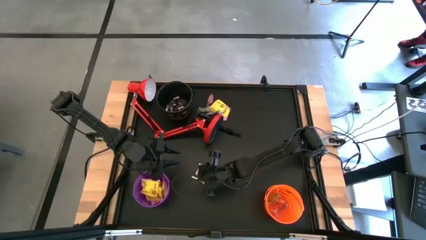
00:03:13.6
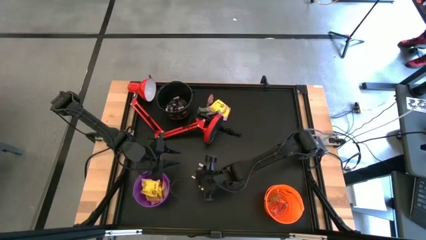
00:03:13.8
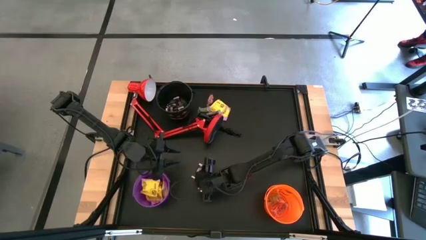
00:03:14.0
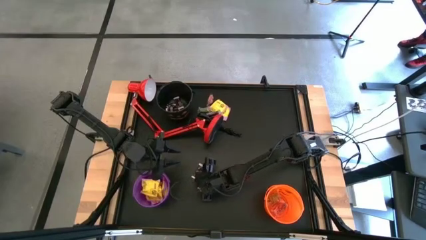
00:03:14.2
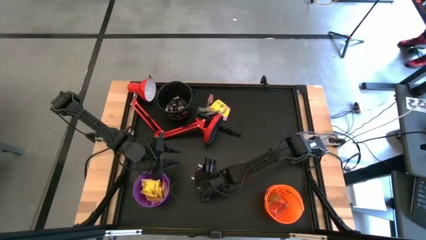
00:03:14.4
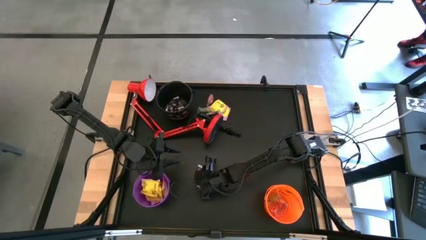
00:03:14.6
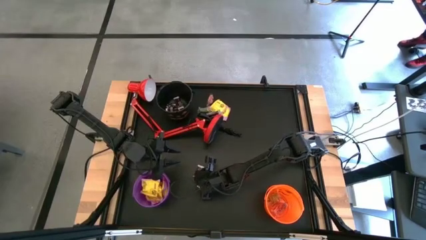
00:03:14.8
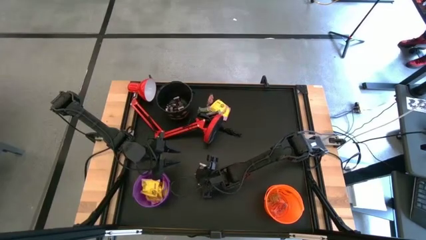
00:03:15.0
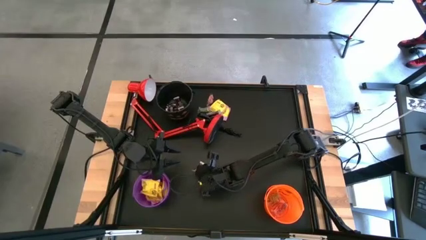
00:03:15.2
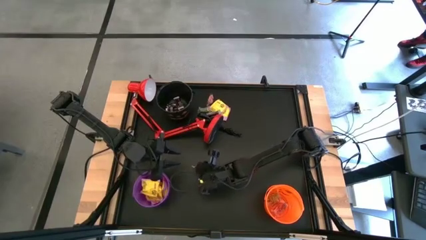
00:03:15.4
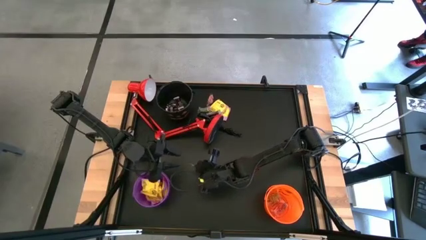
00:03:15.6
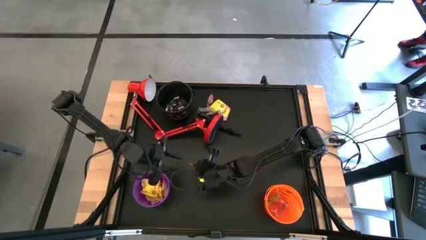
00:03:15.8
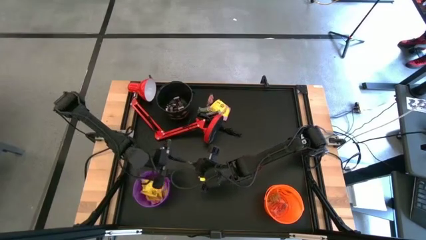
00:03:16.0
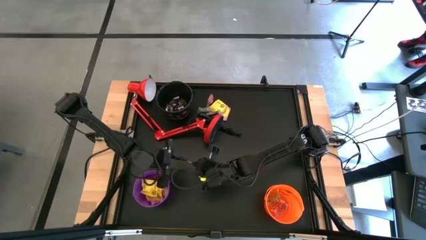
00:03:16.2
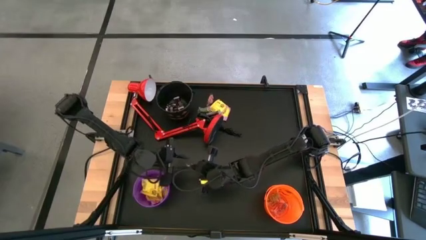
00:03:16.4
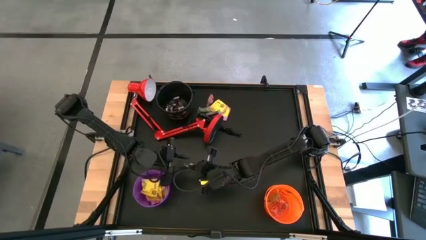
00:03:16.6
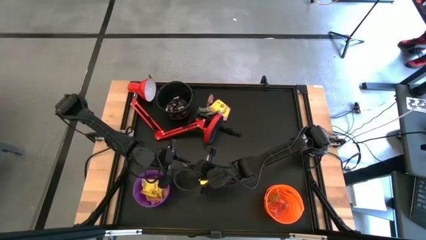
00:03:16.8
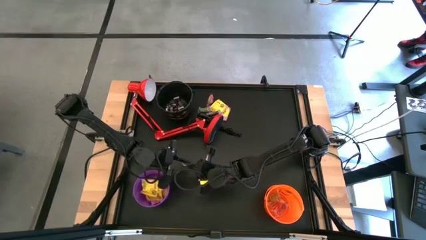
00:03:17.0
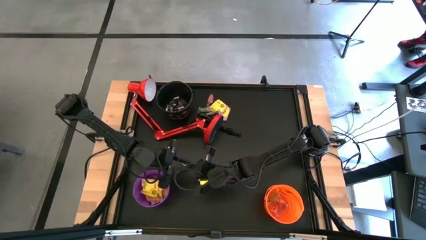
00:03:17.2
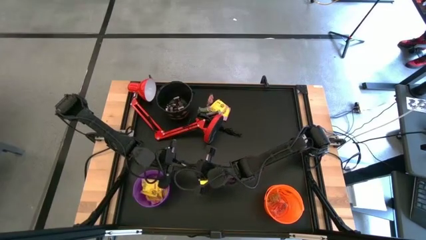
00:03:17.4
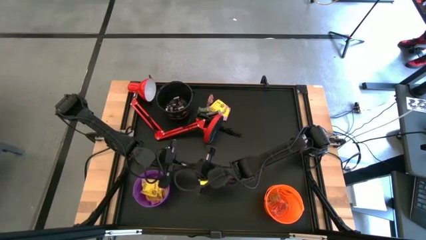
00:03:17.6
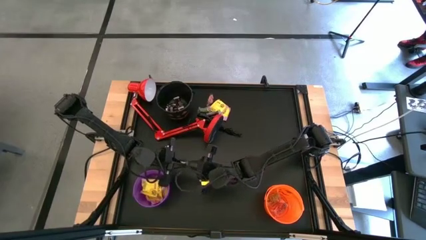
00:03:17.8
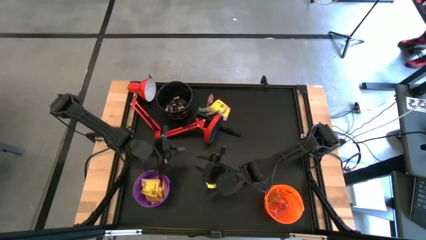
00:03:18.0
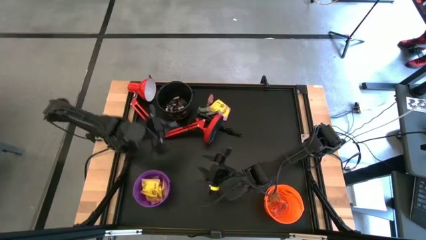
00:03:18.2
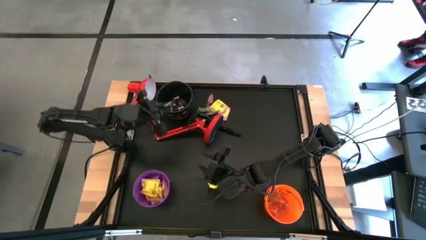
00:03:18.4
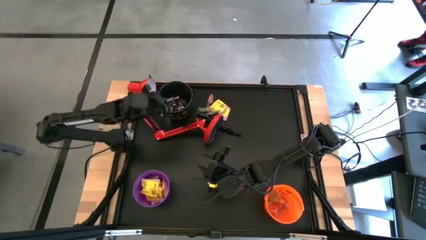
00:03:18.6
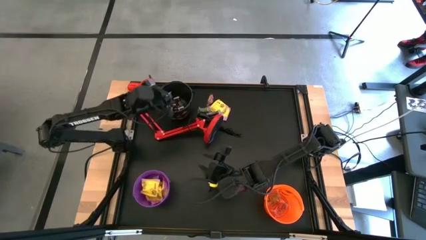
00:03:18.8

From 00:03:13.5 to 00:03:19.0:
Task: Organize candy in baskets
Put the brown chocolate bar into the black bucket

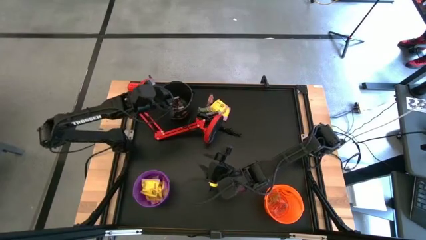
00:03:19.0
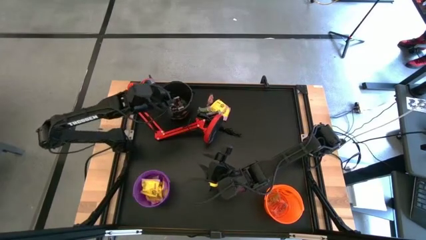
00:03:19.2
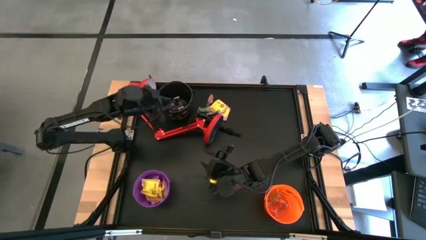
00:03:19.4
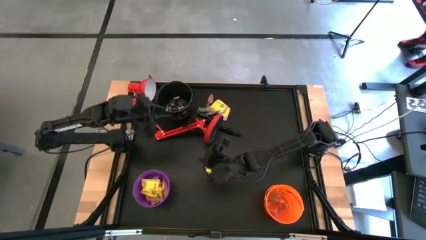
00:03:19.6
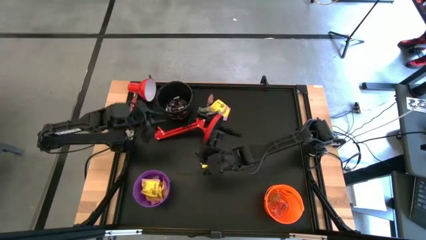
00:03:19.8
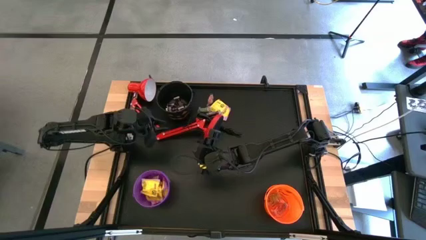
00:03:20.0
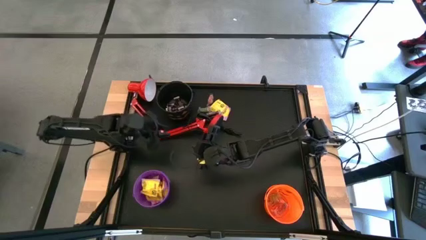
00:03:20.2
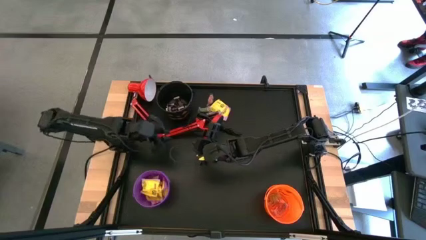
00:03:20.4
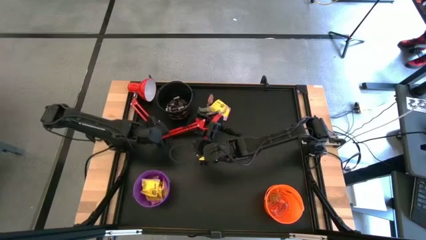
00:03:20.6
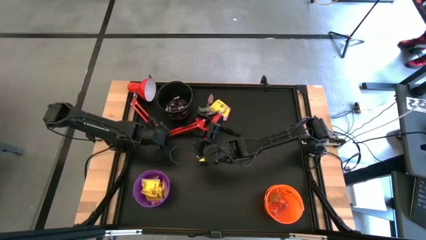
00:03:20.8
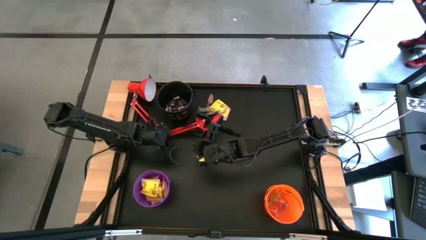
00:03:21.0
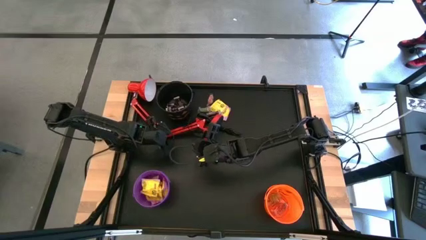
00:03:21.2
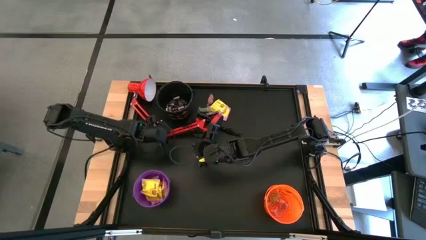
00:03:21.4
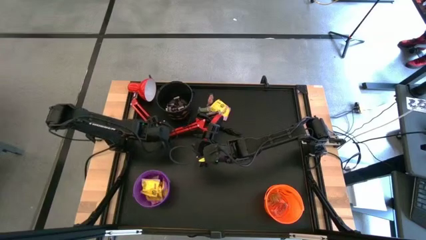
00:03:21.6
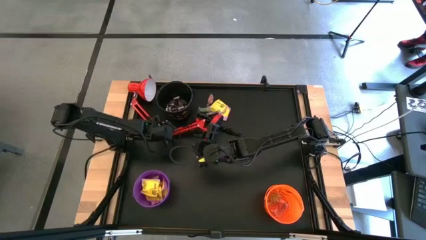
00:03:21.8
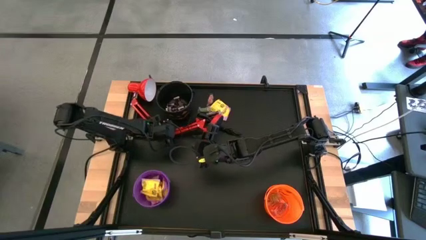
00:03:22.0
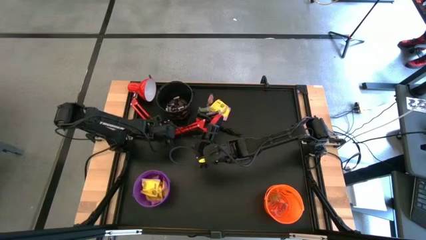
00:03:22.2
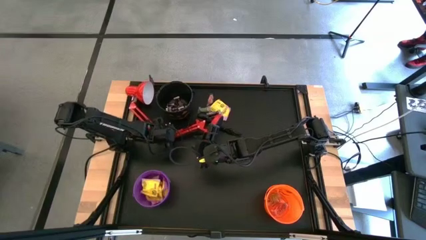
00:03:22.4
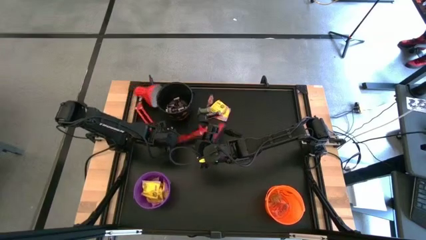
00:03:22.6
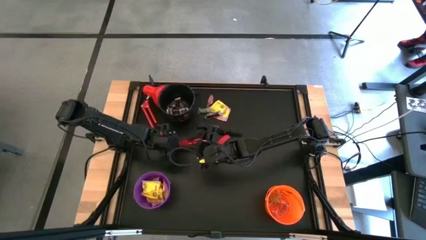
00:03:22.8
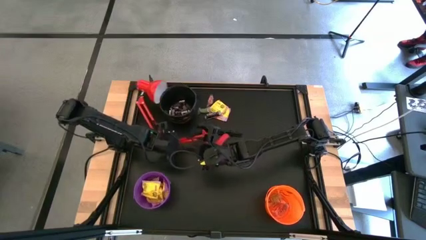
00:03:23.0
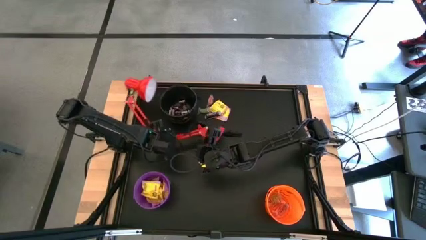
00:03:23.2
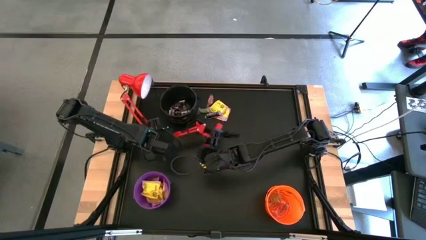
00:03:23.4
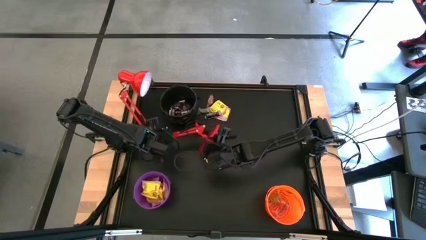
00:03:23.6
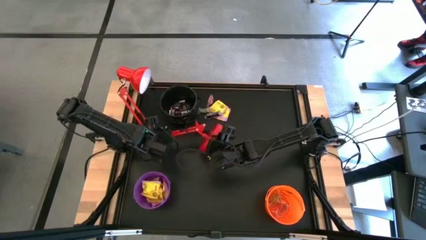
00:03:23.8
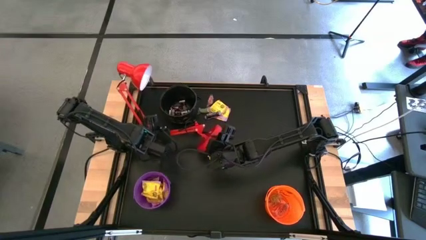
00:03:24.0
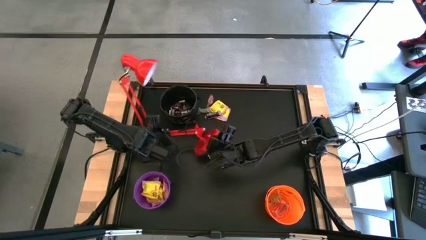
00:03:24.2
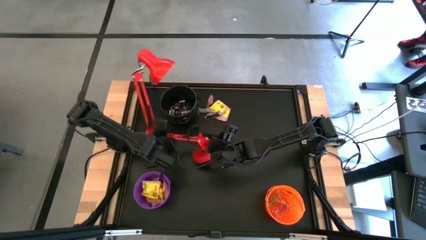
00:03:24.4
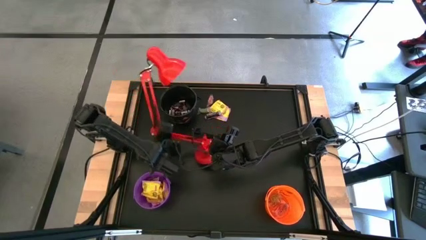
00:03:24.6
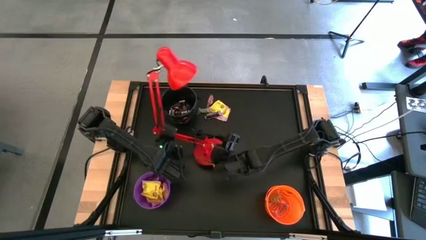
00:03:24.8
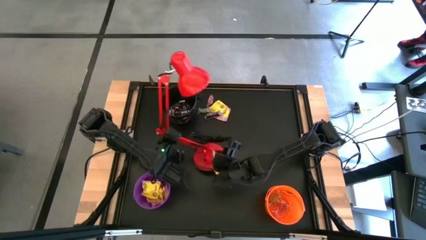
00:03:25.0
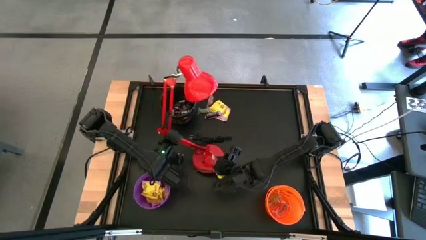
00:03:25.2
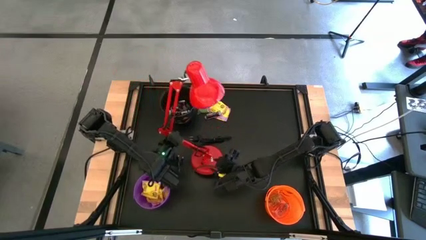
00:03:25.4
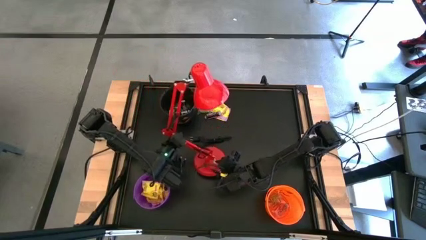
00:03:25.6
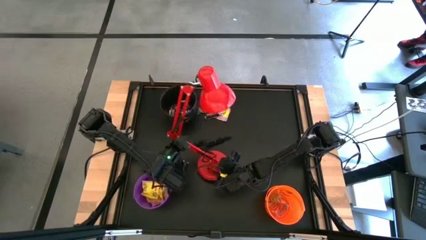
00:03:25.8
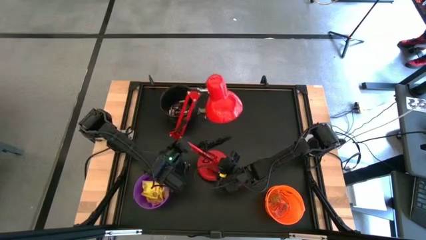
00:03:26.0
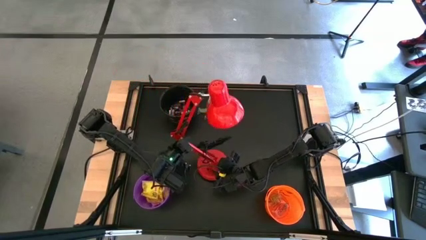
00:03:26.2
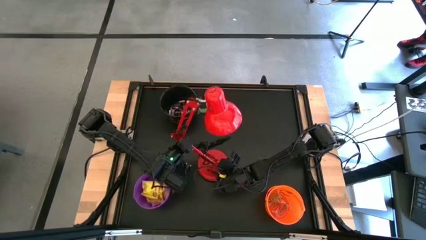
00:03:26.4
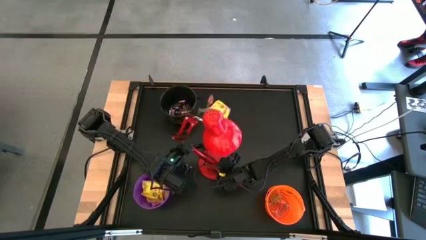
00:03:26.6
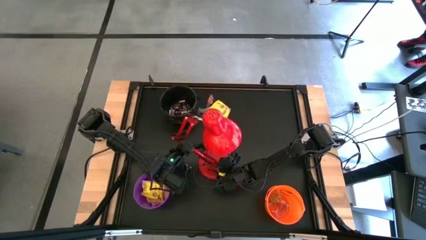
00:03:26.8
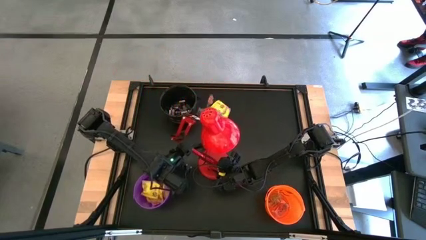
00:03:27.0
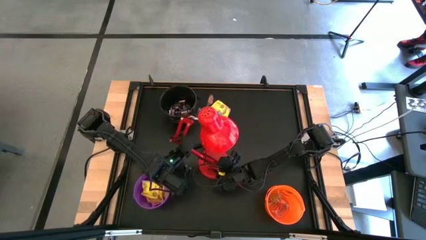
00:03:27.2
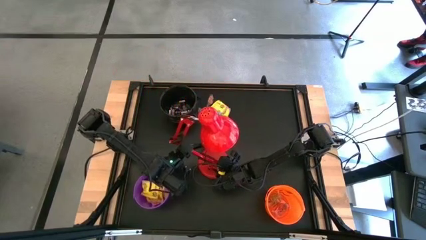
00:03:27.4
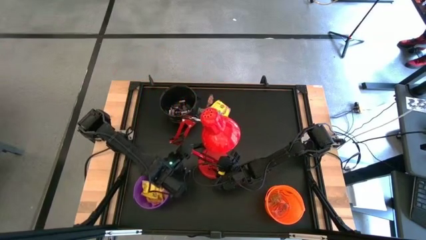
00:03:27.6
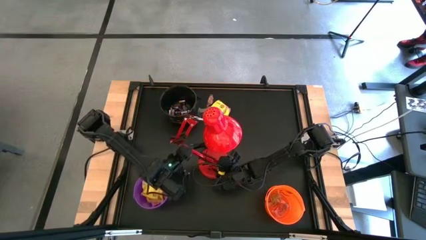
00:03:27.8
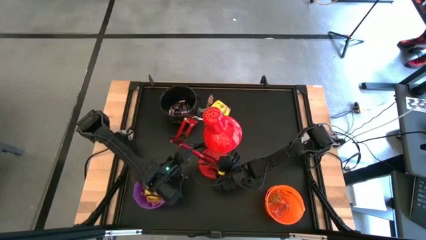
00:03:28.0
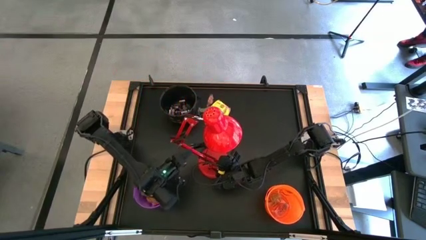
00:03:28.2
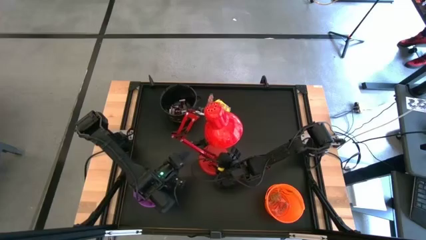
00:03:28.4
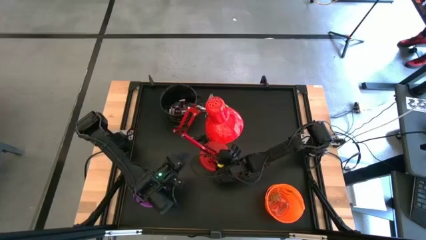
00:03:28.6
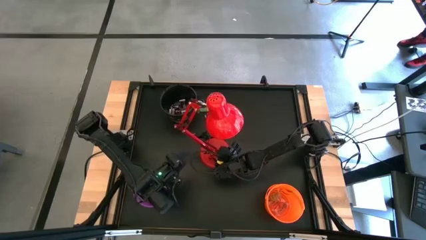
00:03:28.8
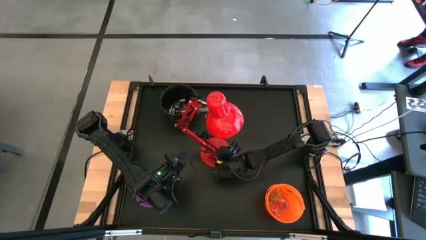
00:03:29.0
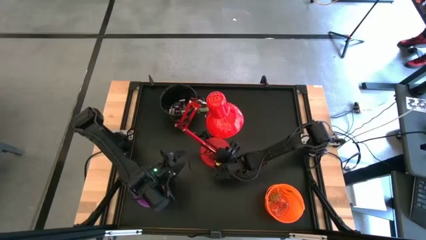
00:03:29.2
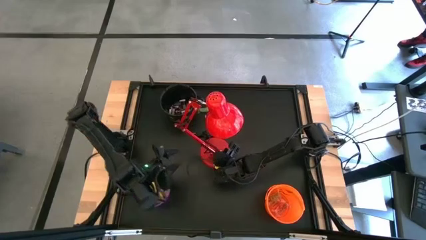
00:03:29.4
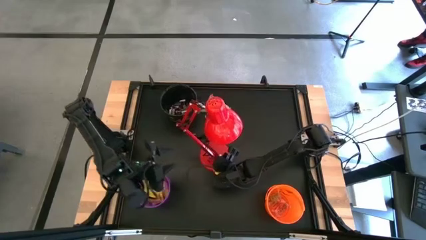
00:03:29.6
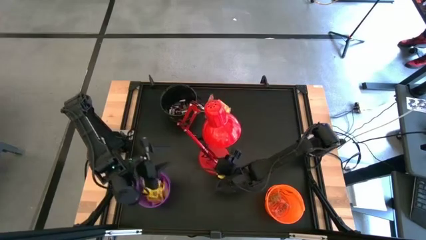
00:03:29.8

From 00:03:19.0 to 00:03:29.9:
Adjust the red lamp
